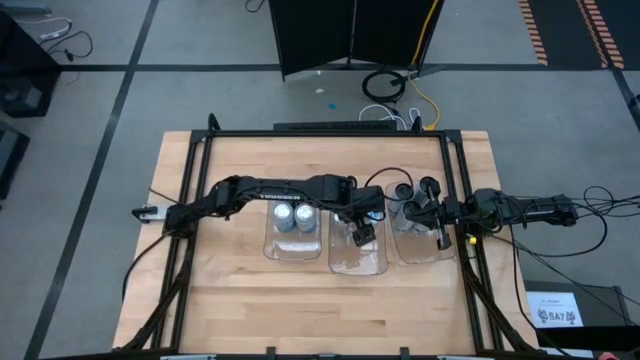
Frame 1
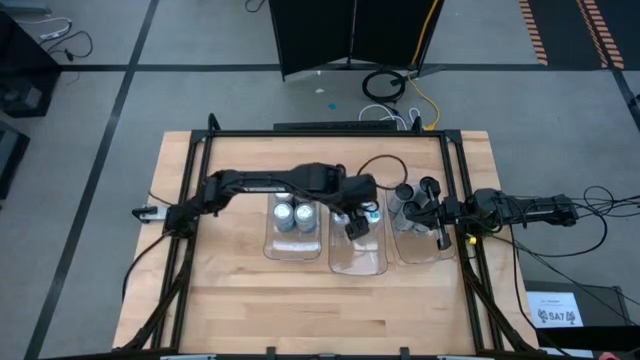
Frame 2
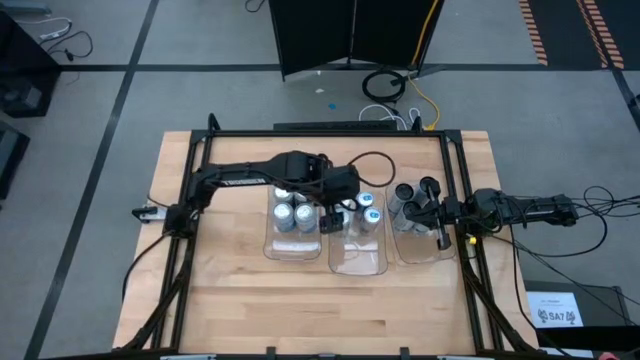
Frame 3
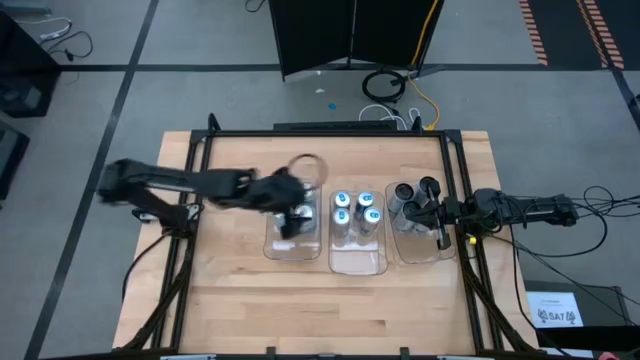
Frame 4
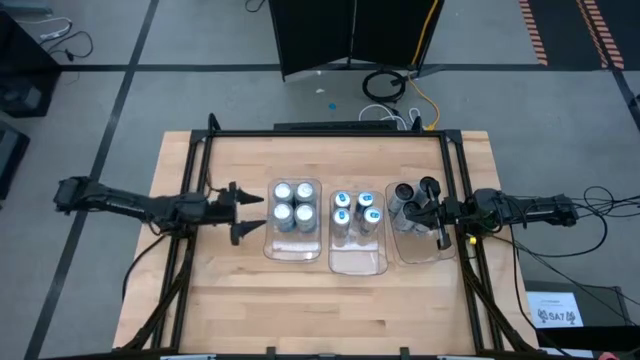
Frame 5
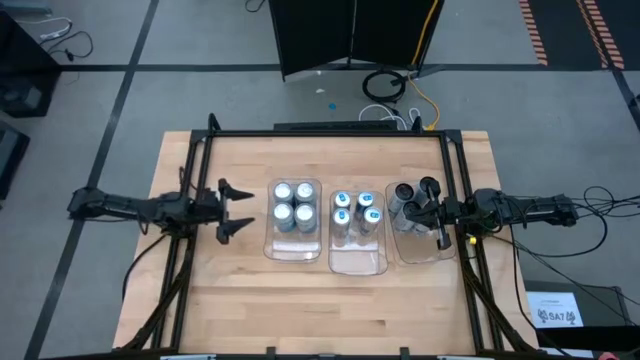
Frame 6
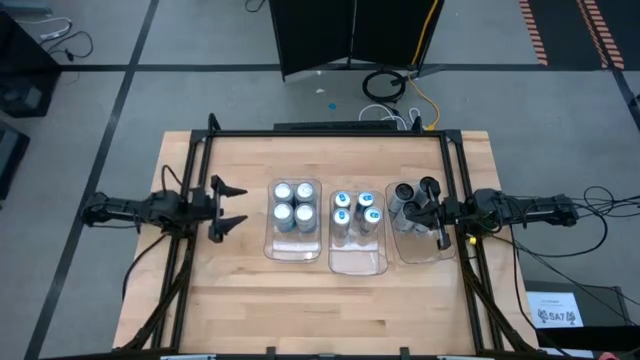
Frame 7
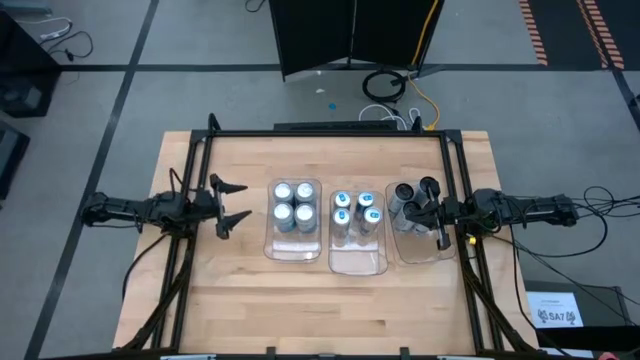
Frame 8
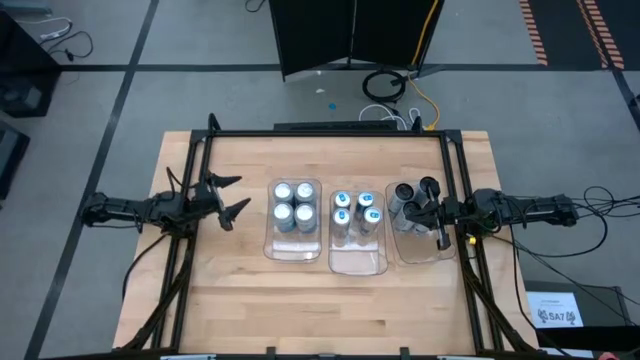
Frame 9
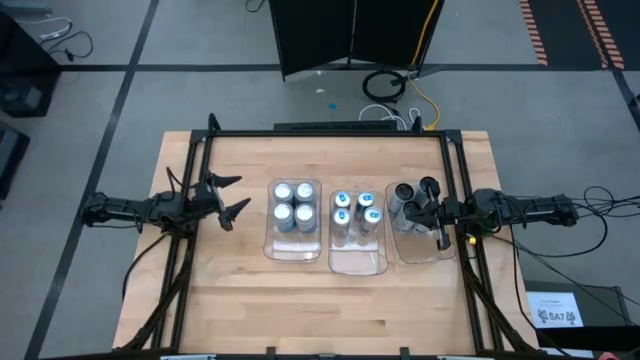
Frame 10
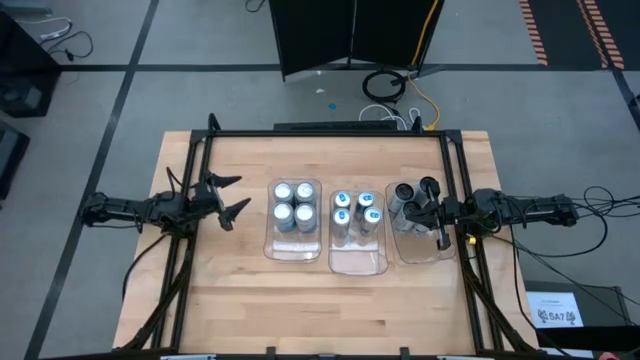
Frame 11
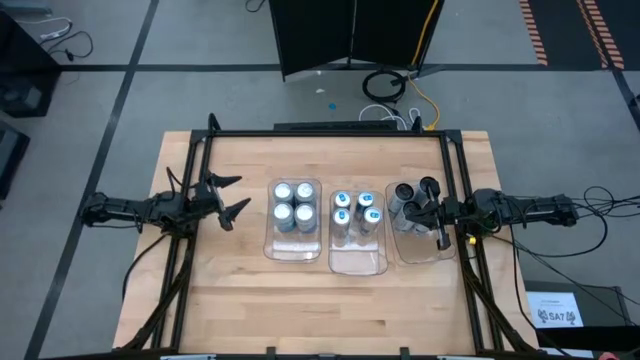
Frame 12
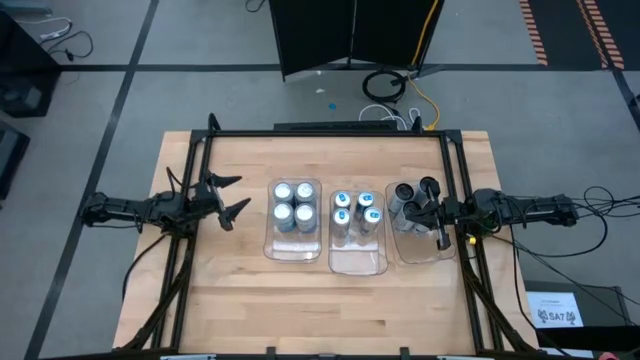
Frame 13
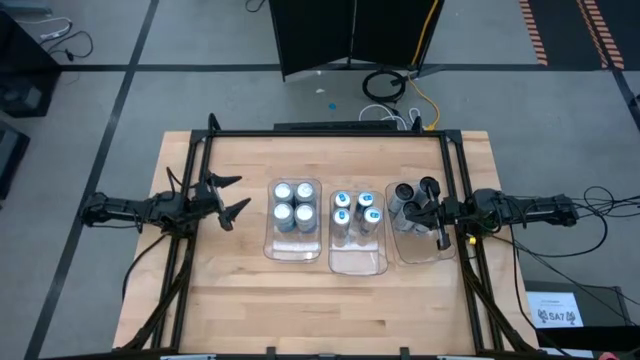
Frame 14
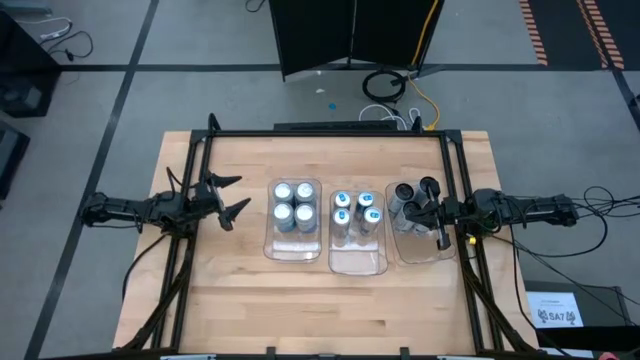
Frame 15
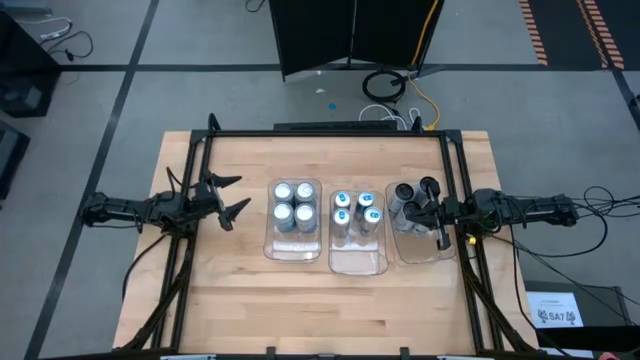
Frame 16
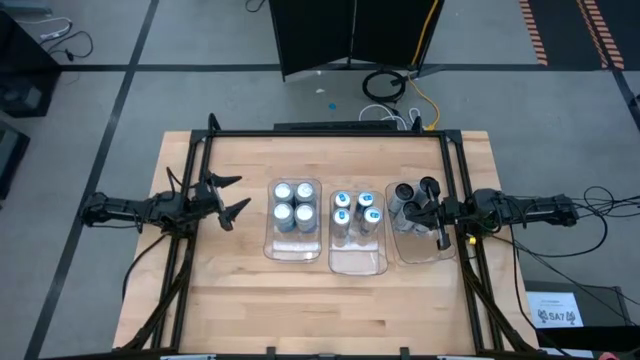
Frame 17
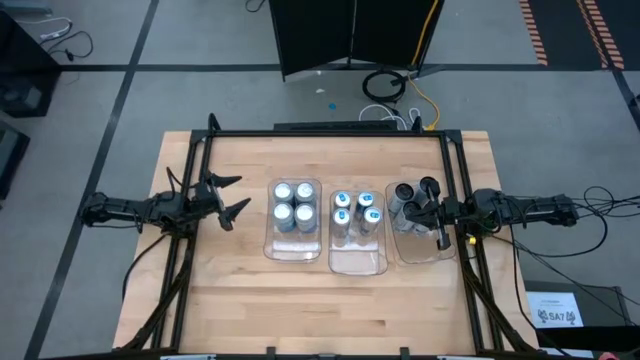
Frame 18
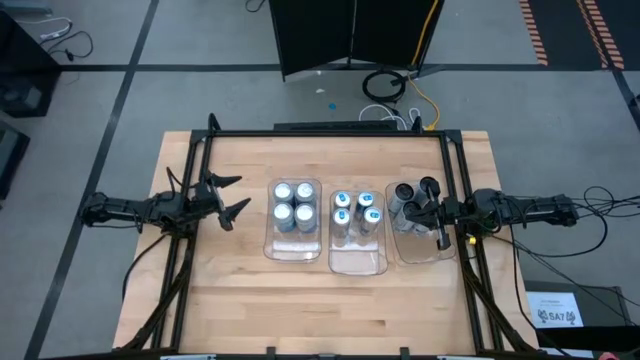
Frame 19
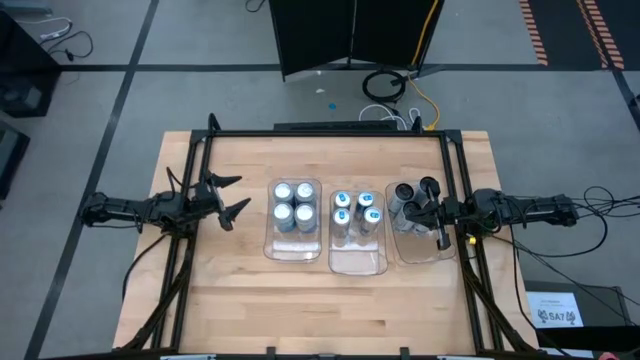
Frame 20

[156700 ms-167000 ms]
Task: Sort soda cans
Return to Home Position

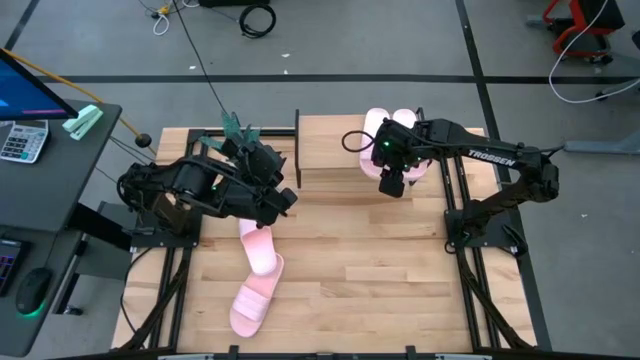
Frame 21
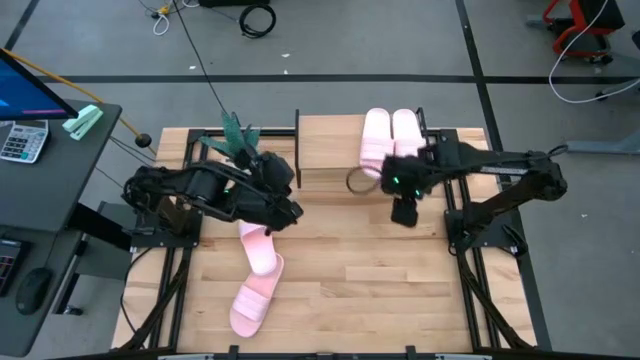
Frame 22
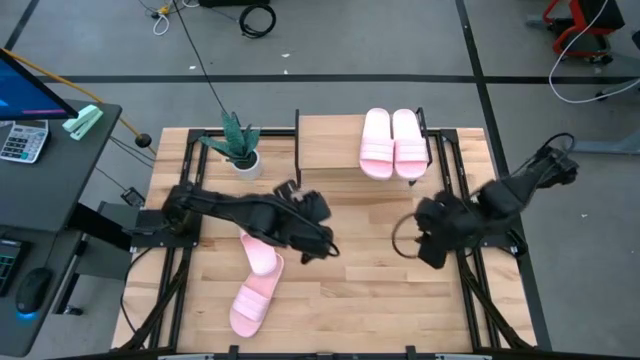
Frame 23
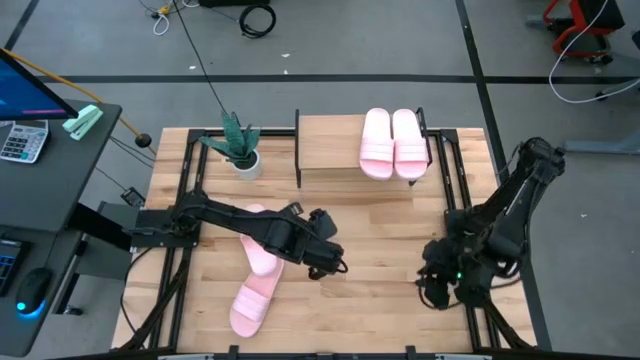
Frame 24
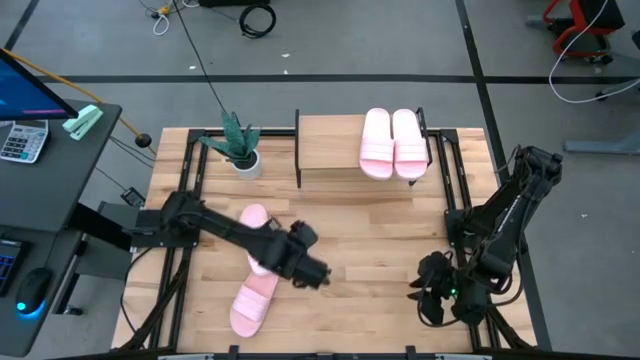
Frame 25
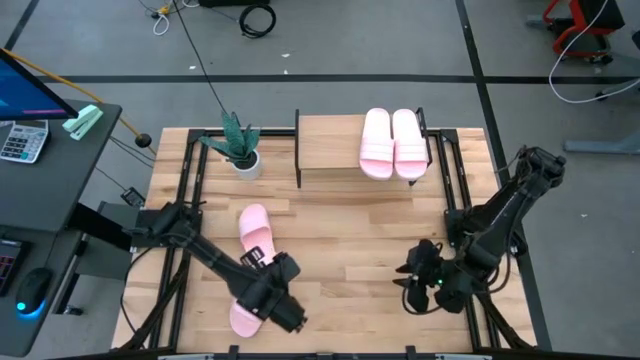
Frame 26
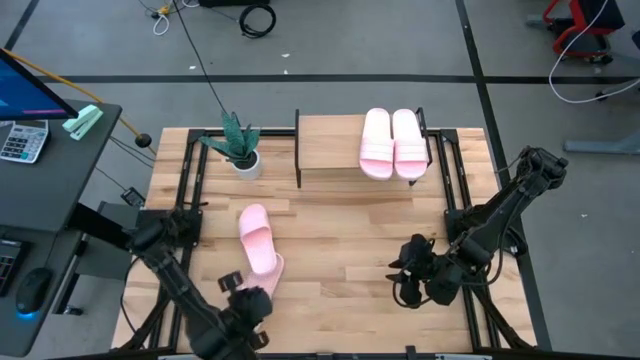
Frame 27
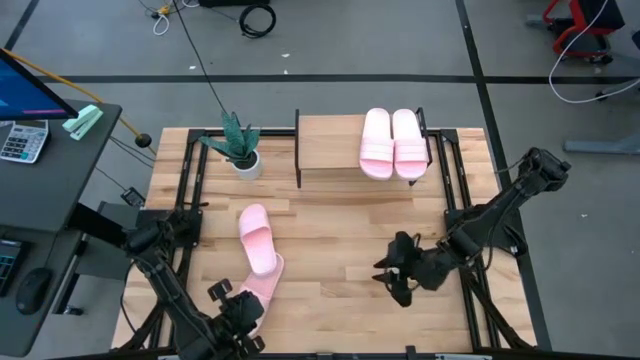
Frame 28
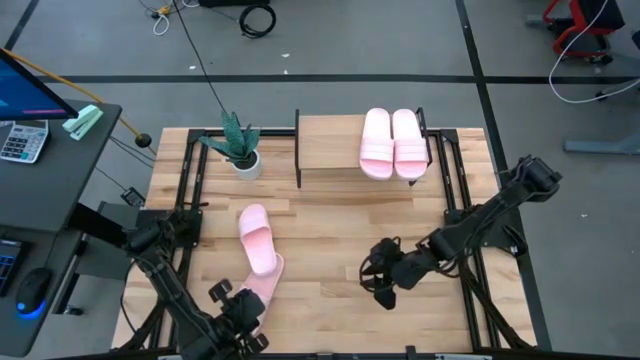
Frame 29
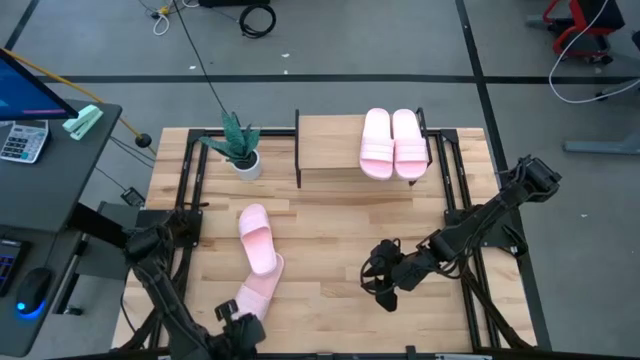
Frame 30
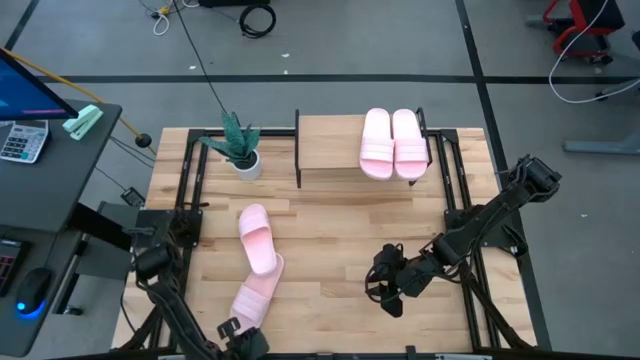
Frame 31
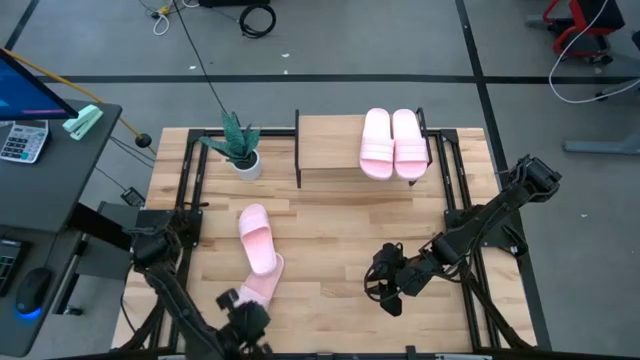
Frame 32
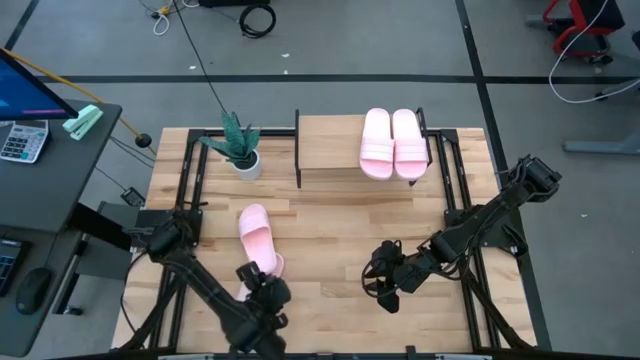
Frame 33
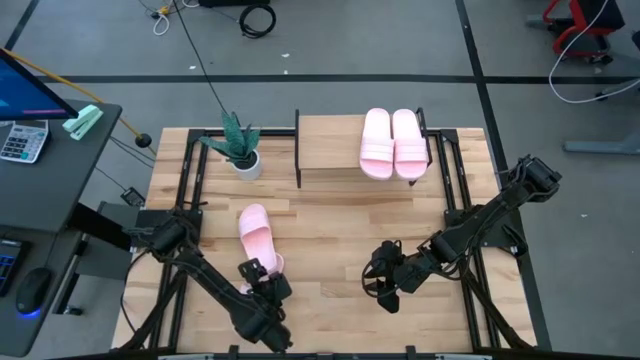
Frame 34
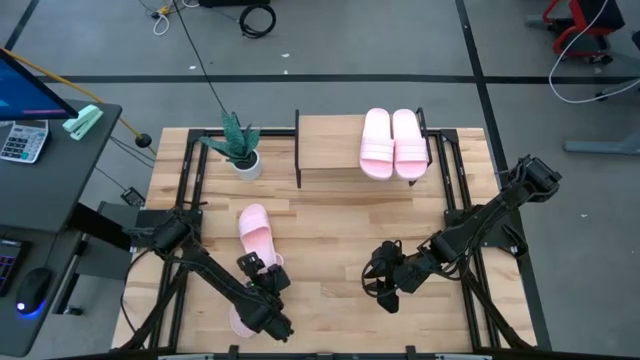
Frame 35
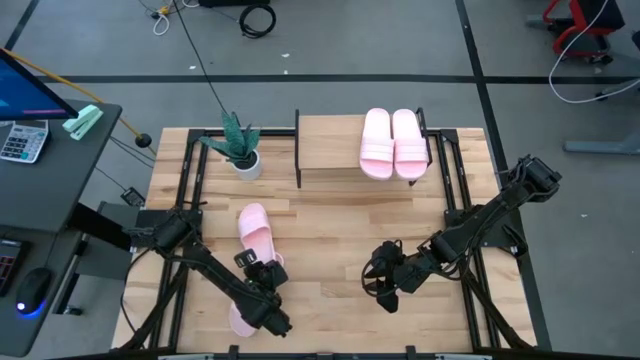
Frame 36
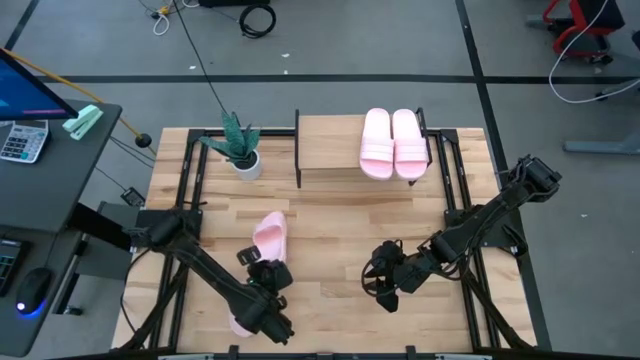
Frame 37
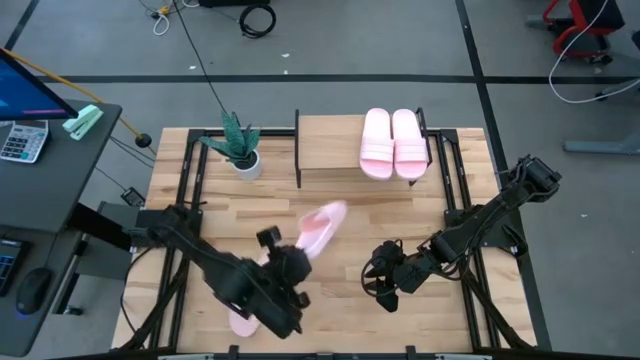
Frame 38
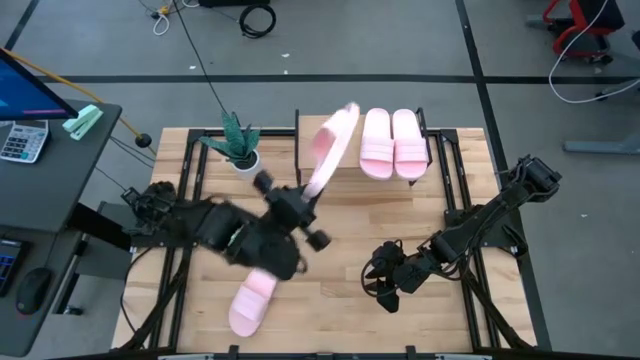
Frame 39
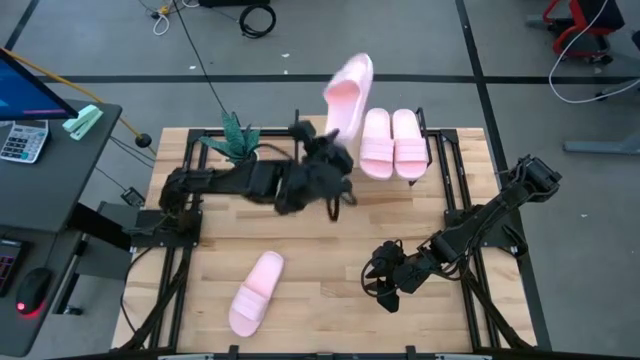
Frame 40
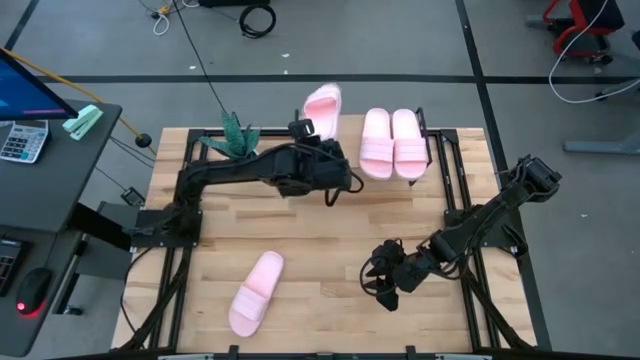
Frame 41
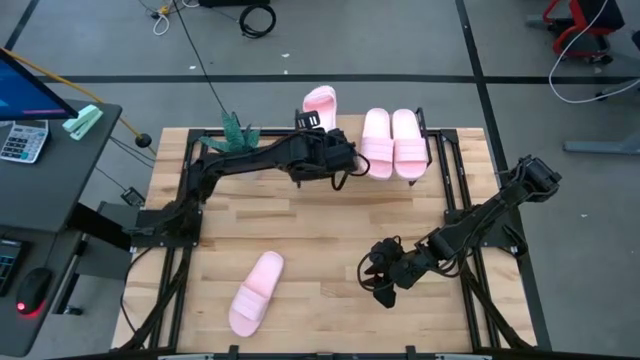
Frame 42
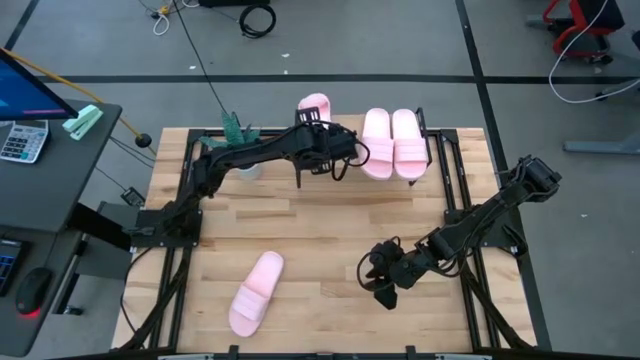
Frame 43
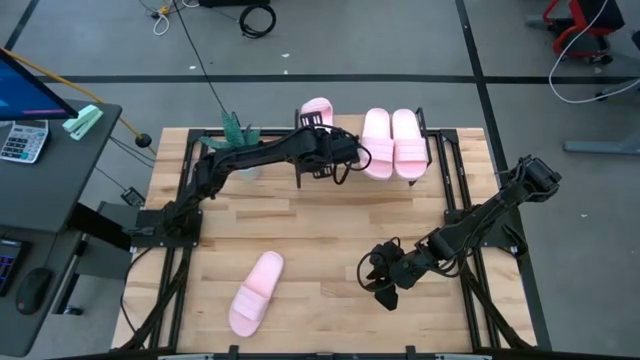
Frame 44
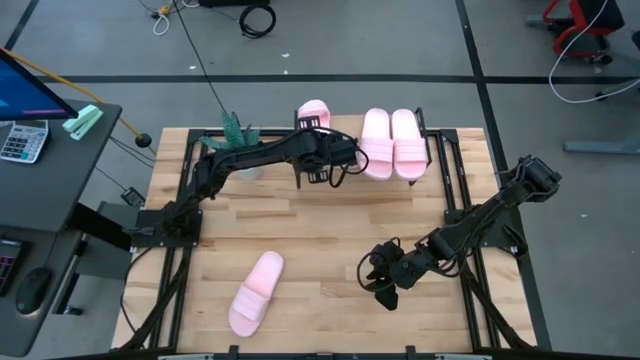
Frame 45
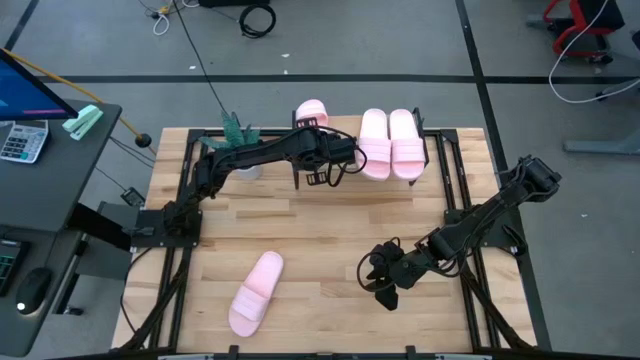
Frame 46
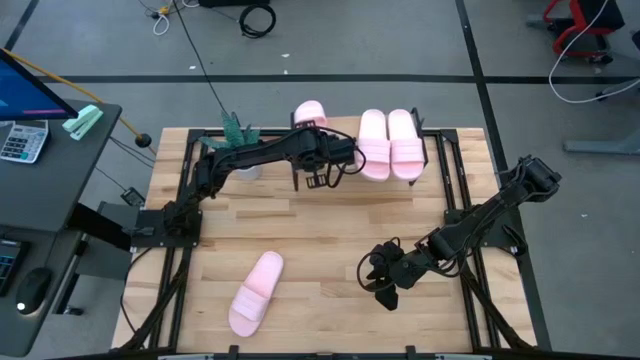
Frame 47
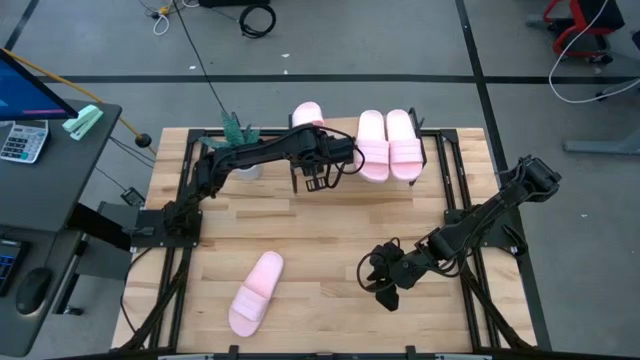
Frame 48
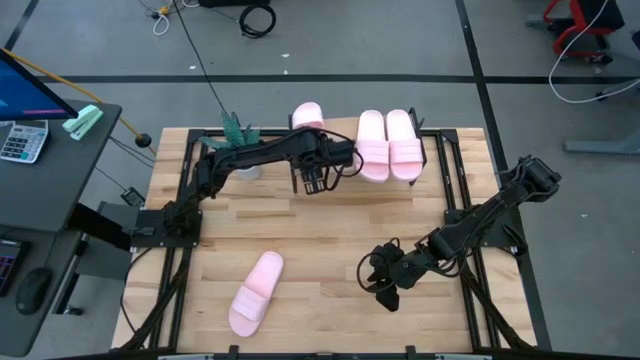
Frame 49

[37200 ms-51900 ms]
Task: Pick and place slides into the shelf
Put the pink slipper on the shelf
